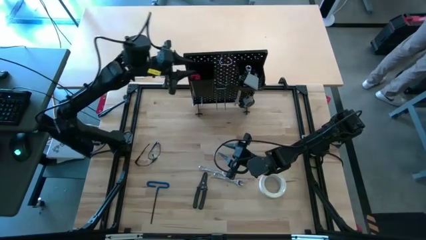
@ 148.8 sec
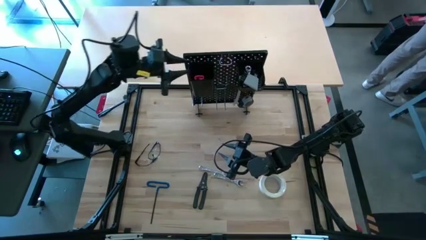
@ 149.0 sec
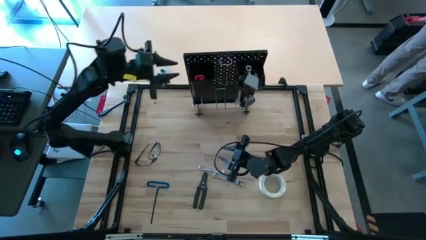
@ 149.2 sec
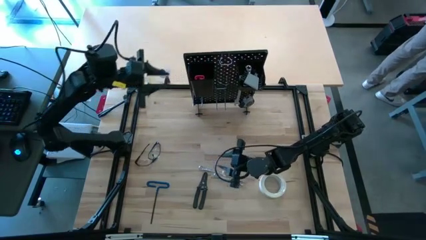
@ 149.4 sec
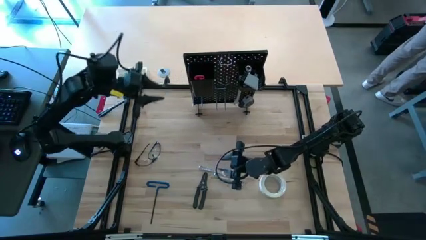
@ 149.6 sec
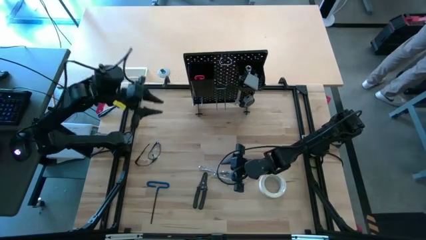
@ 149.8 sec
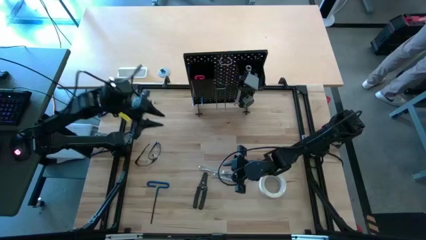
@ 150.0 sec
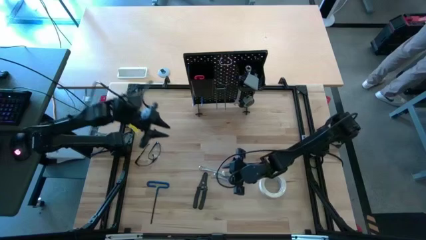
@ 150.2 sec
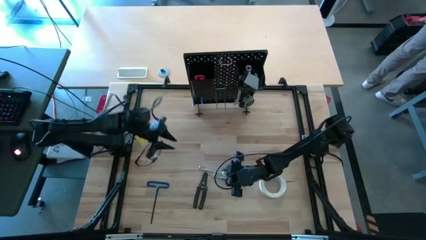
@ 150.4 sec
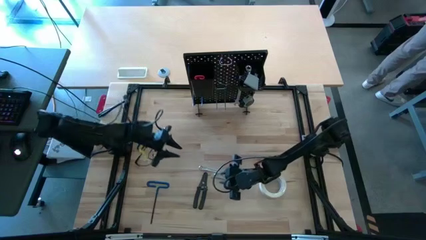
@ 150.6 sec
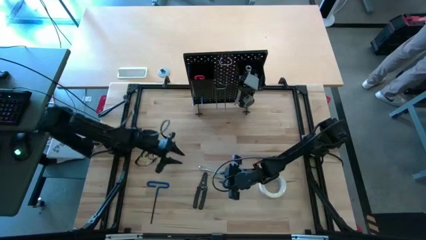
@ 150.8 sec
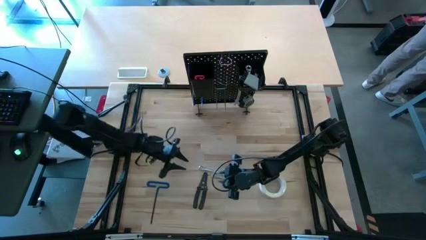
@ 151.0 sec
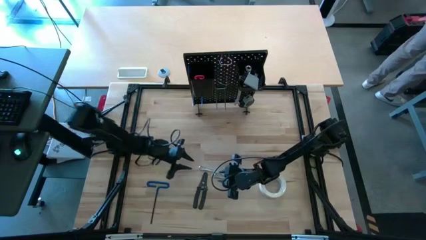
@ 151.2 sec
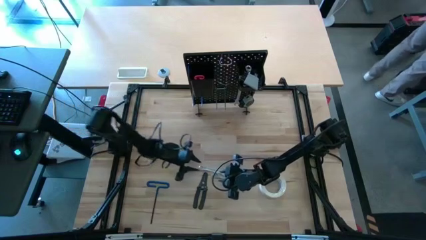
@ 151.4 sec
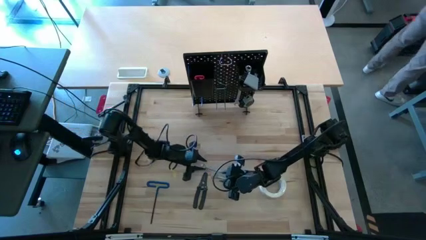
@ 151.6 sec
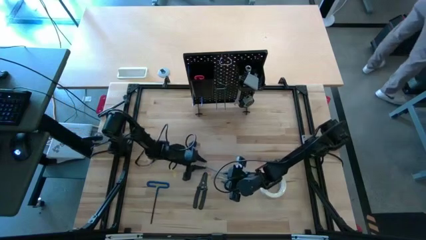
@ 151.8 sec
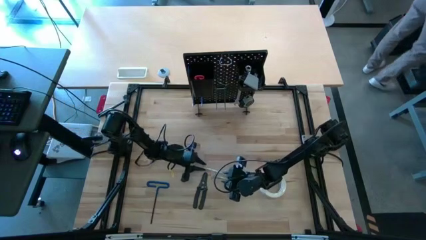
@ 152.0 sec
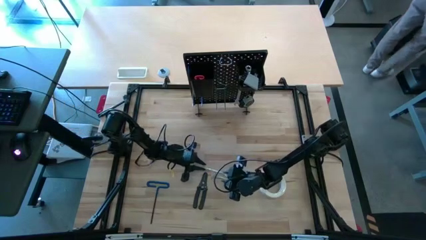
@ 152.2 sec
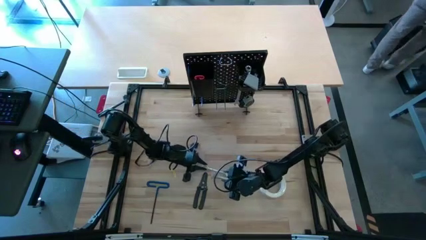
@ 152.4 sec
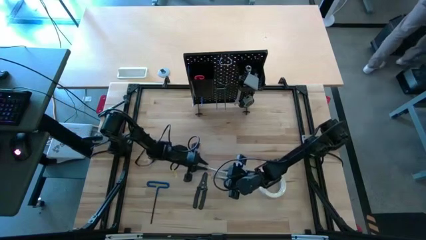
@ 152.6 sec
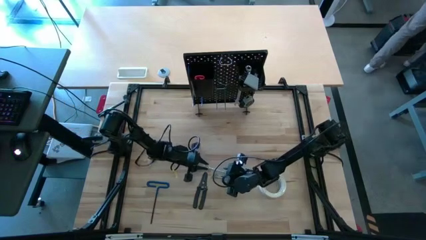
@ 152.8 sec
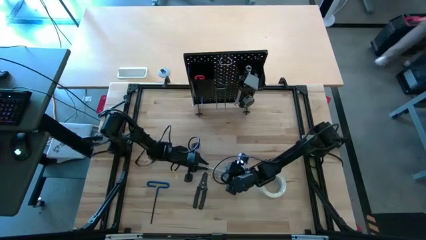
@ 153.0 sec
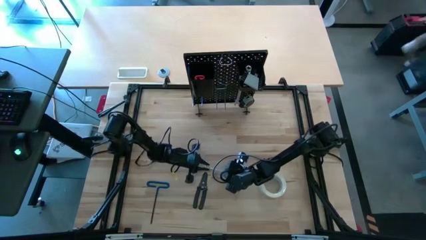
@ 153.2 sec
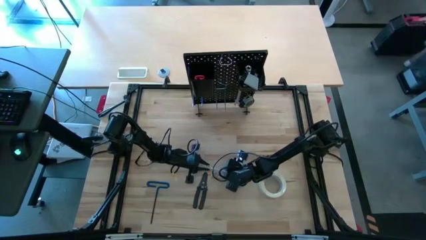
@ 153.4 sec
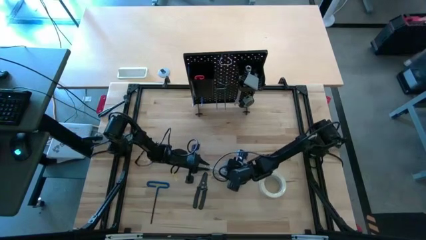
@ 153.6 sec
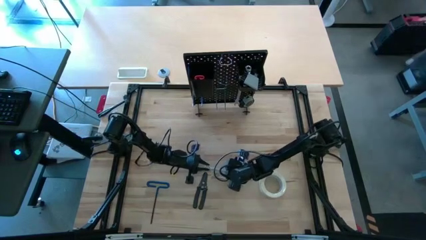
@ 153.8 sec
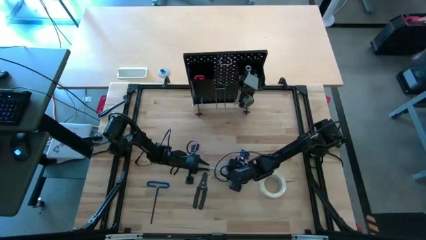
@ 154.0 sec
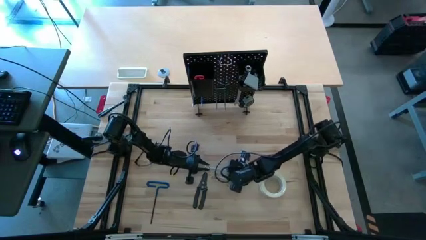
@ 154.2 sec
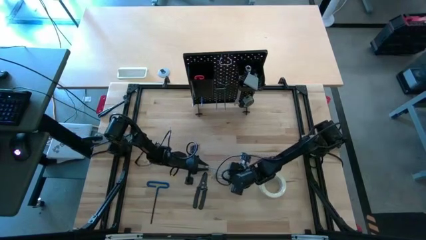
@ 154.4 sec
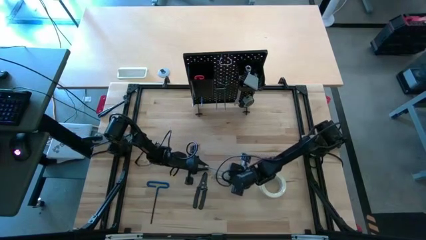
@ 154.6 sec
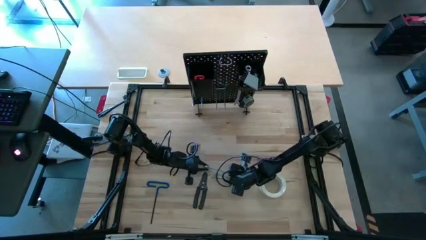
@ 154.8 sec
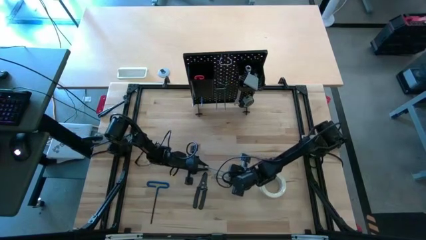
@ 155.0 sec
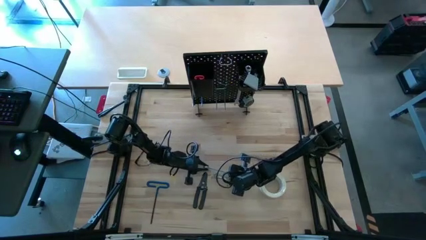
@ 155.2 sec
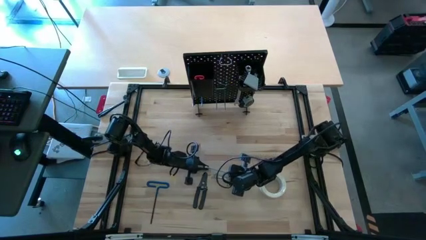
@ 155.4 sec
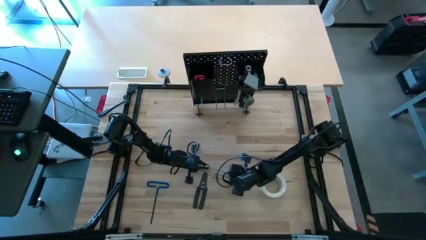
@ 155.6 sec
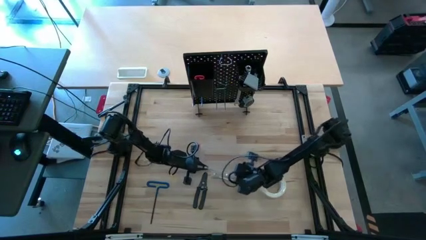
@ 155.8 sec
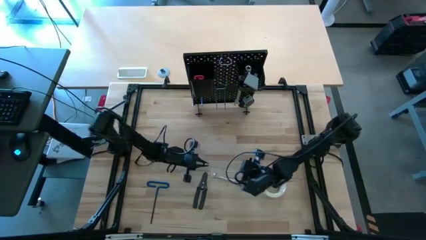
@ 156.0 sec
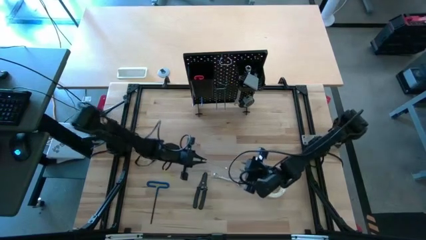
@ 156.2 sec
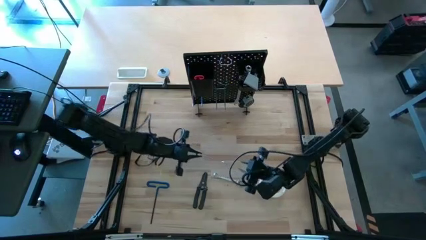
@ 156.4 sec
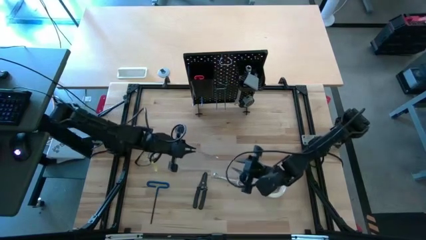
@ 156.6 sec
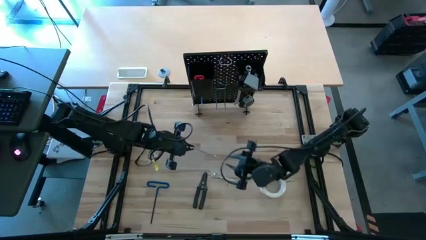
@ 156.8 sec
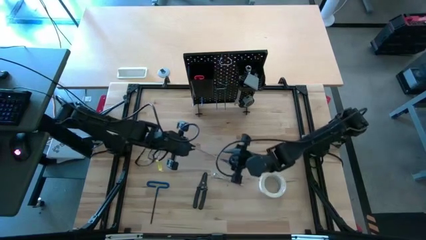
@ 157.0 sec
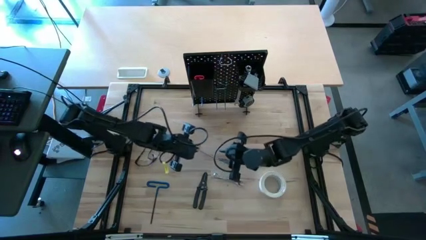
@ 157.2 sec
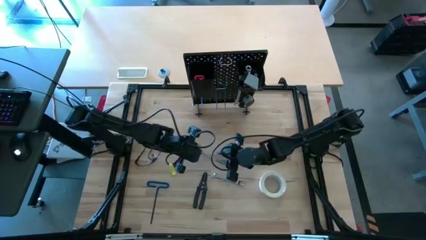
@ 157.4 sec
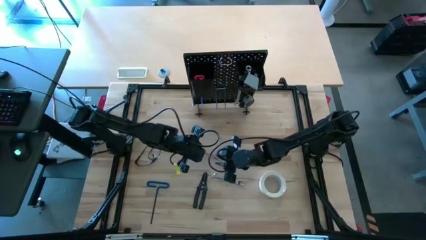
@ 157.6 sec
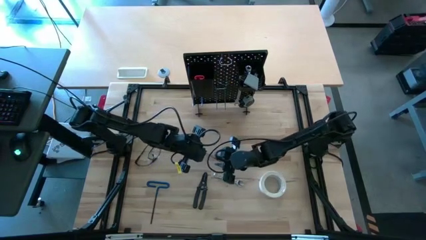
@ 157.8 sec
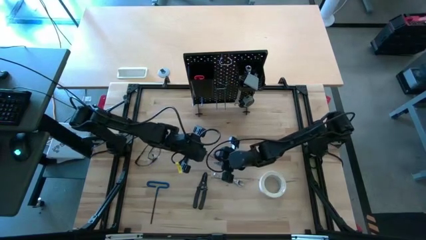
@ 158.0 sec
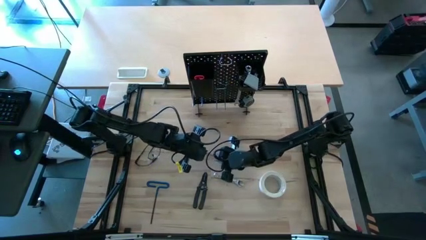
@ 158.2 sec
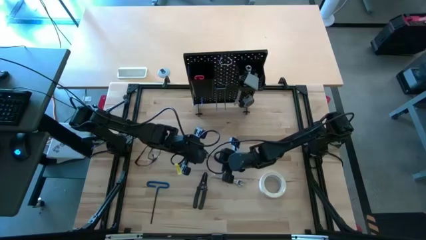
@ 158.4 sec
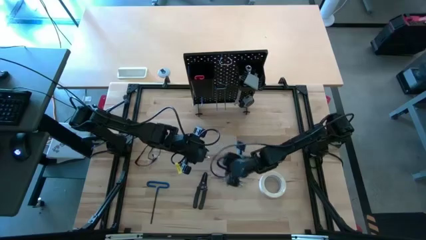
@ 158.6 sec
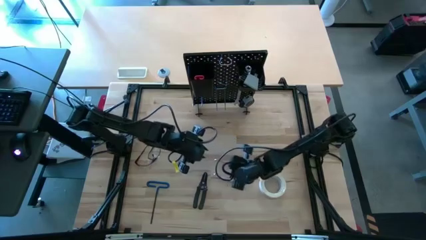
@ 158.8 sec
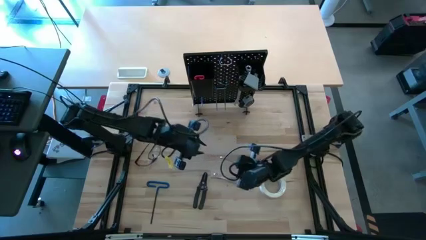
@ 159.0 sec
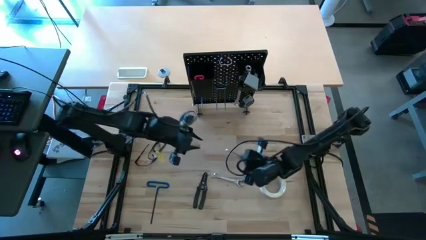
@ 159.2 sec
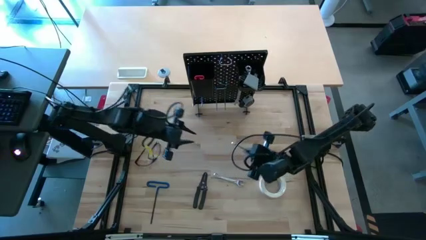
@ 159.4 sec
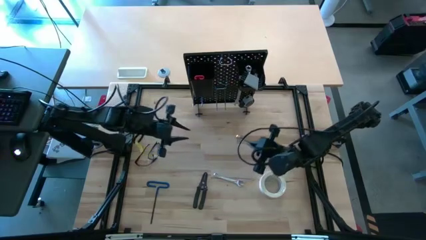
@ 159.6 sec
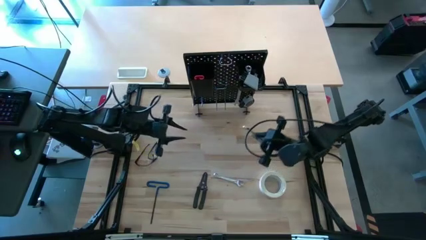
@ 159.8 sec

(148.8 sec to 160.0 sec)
Task: Hang tools onto peg board
Hang the top silver wrench on the pegboard

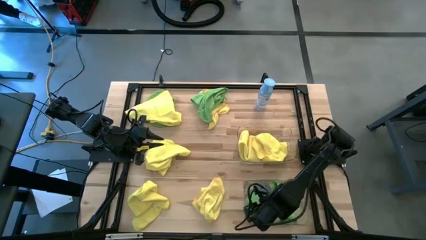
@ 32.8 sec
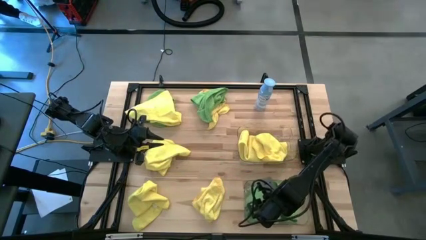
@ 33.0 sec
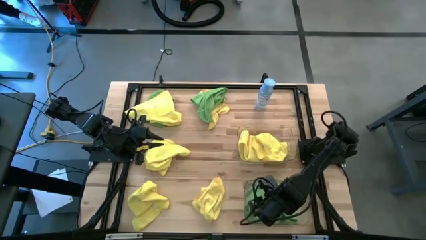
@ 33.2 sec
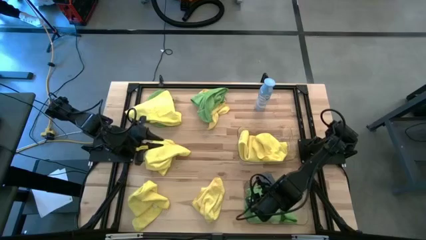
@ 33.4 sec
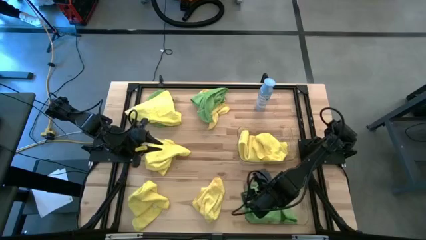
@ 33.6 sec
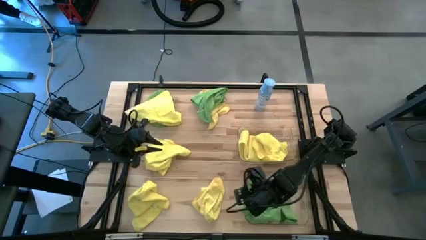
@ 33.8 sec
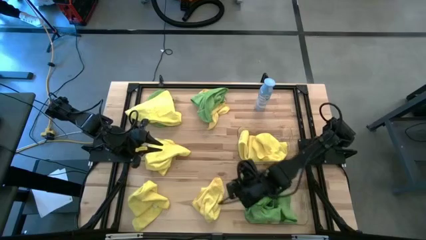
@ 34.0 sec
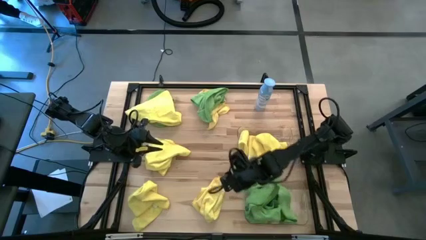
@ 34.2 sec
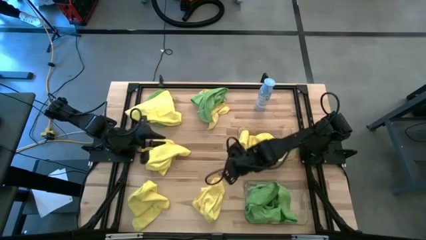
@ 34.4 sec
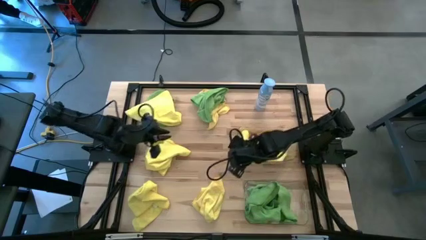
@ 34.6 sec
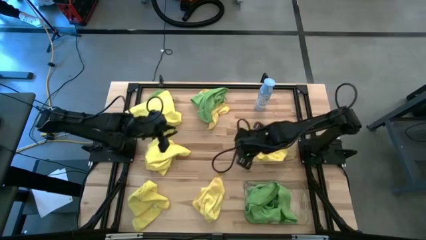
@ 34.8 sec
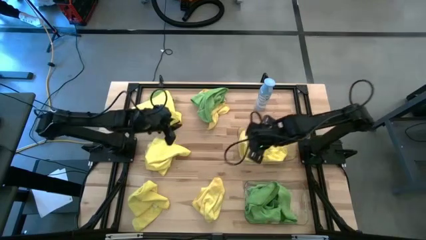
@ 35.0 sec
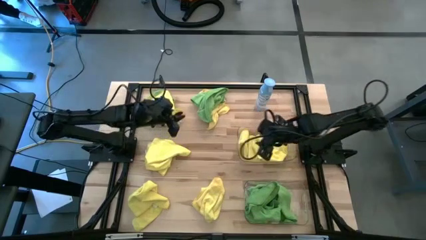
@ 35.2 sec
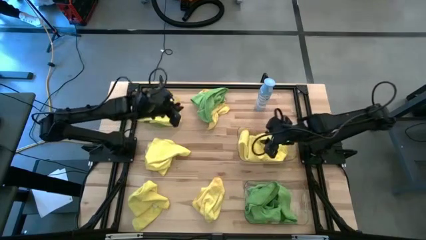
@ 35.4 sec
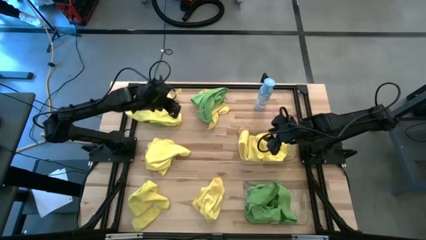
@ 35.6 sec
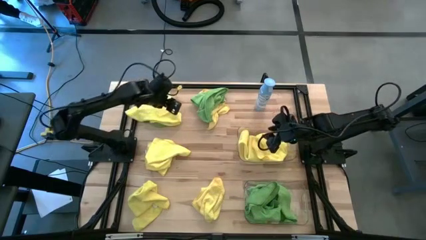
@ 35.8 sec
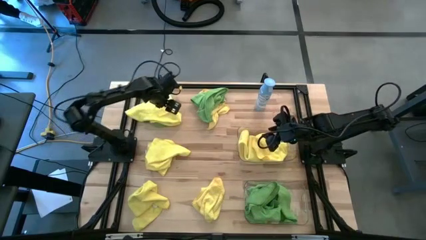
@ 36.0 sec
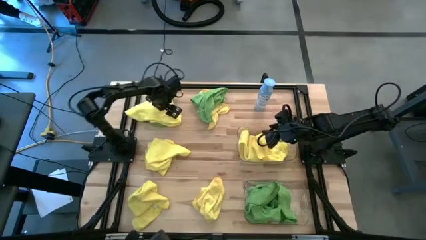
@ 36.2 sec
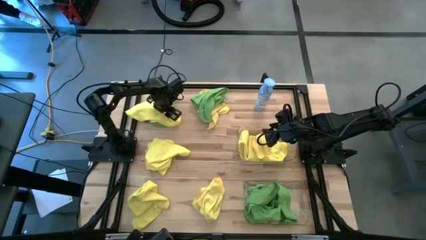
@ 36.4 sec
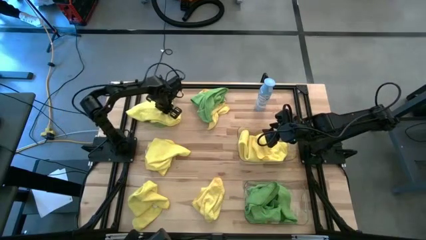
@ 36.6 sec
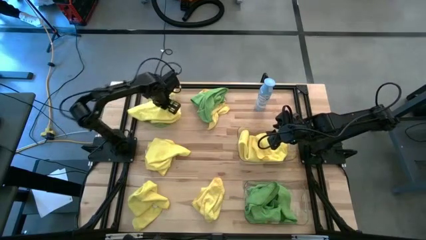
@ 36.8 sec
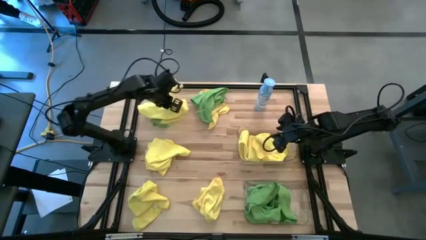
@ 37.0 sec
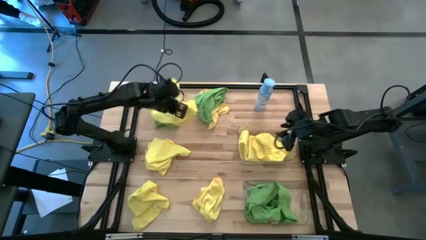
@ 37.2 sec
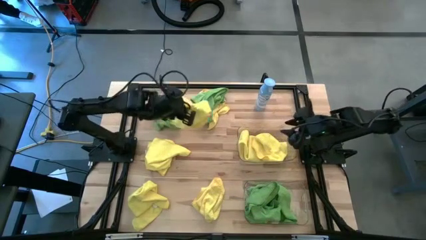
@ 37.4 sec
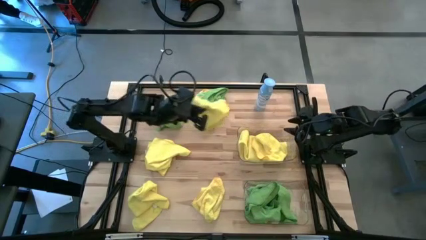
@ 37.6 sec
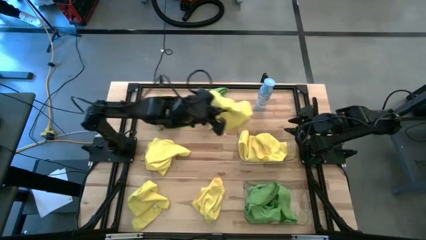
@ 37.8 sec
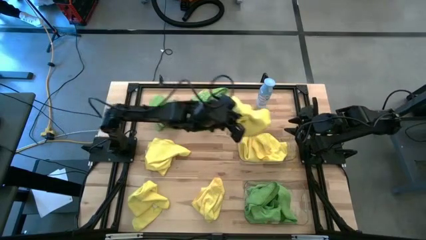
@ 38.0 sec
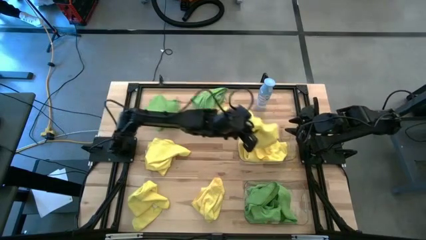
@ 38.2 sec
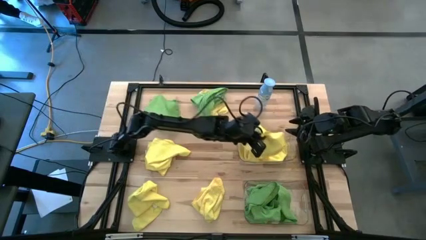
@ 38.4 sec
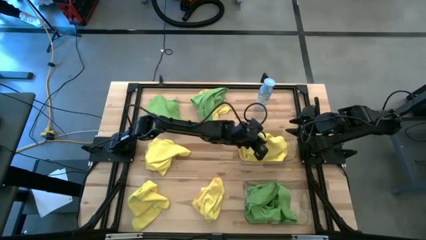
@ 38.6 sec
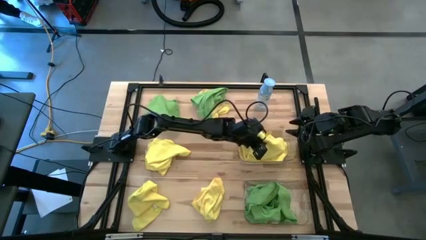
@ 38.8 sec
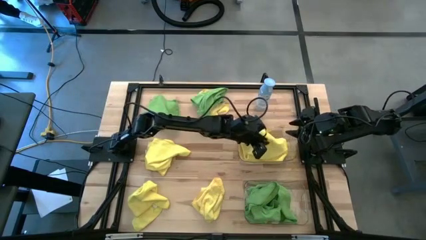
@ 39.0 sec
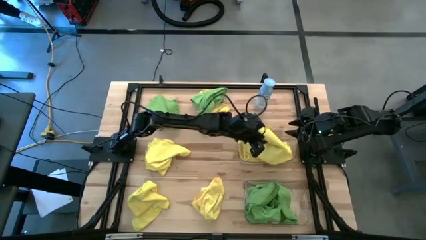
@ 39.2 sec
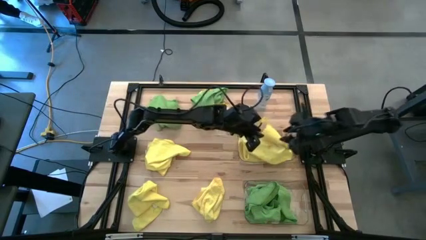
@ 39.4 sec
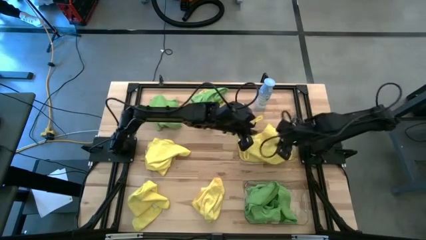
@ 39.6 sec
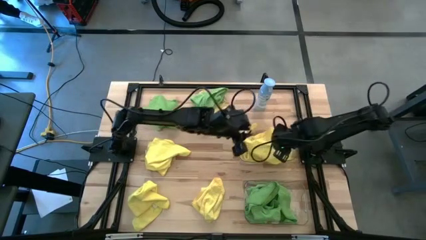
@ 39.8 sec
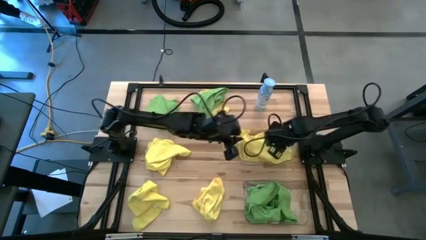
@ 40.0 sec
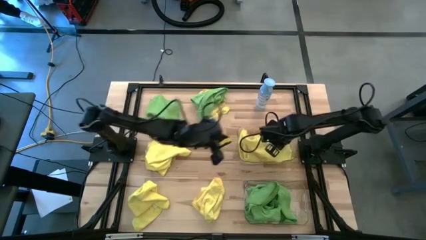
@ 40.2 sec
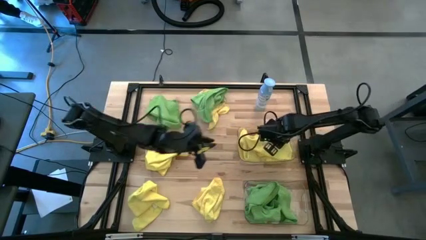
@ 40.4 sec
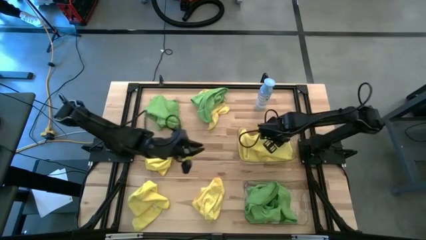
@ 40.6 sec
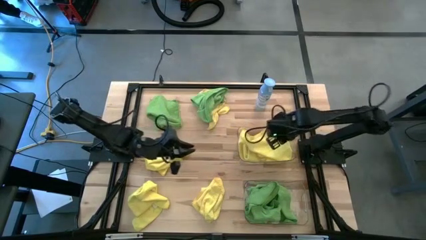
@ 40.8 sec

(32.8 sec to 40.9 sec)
Task: Sort microfiber towel by color & place in baskets
Put the yellow microfiber towel into the top transparent bin
